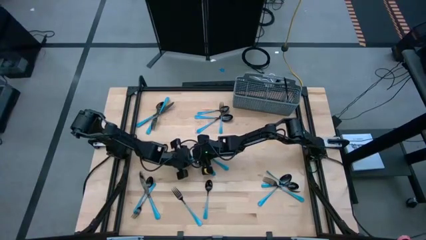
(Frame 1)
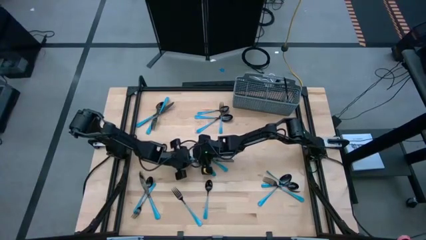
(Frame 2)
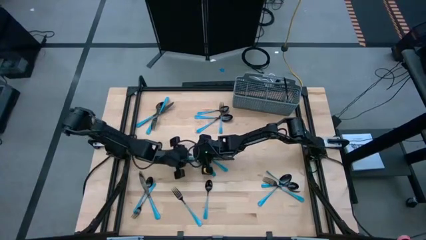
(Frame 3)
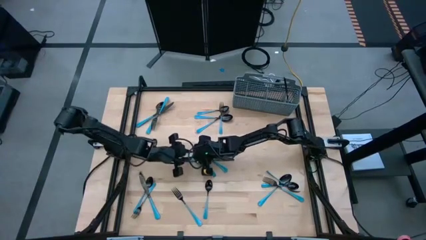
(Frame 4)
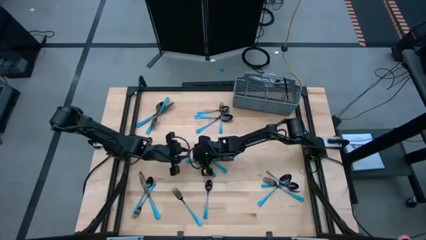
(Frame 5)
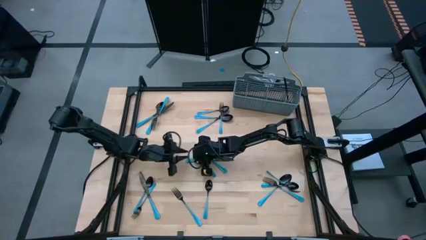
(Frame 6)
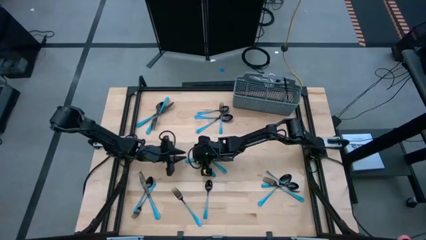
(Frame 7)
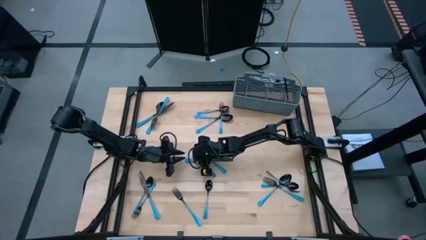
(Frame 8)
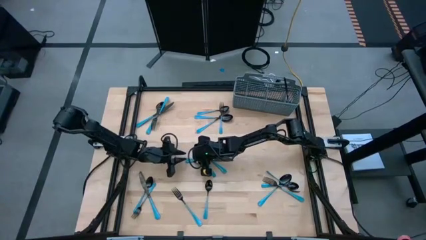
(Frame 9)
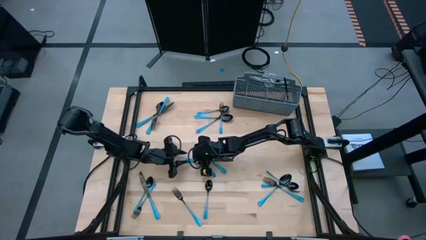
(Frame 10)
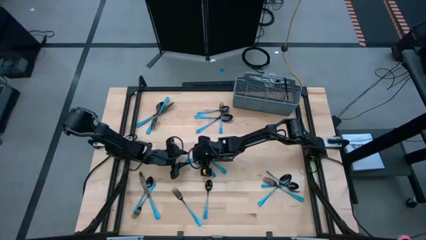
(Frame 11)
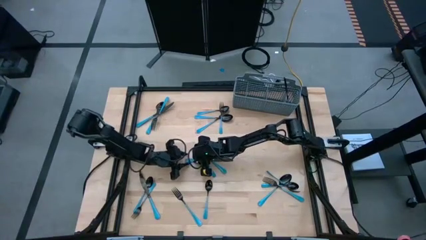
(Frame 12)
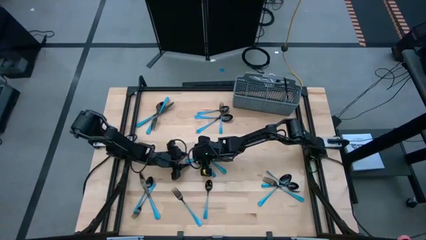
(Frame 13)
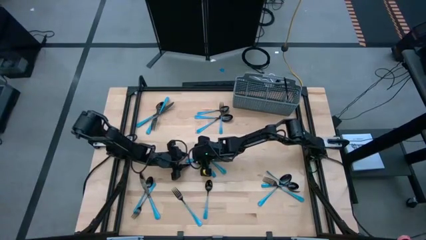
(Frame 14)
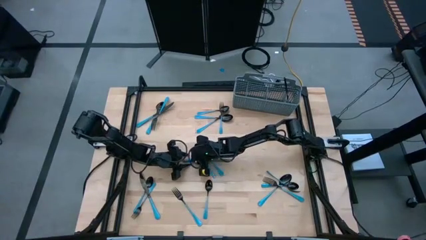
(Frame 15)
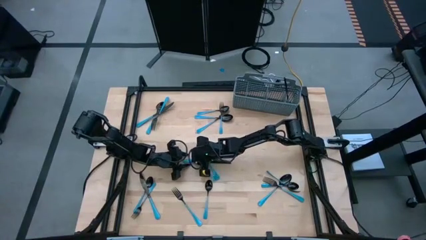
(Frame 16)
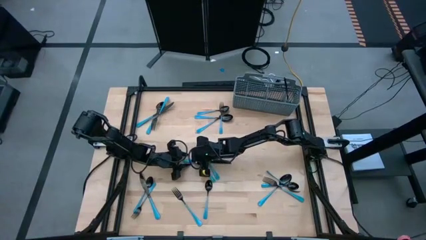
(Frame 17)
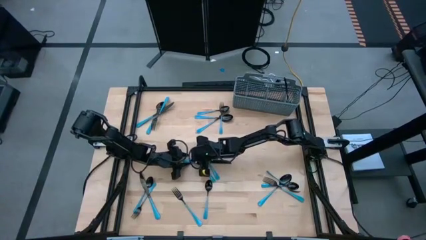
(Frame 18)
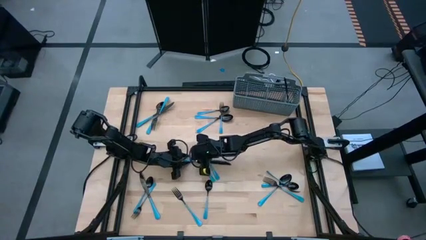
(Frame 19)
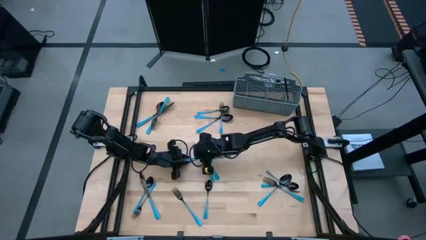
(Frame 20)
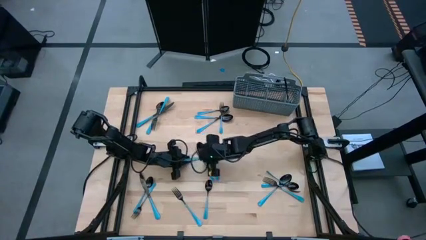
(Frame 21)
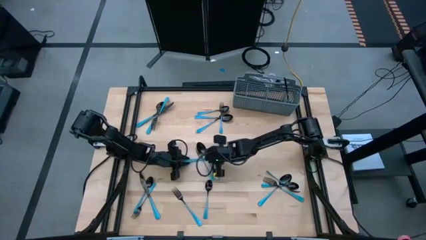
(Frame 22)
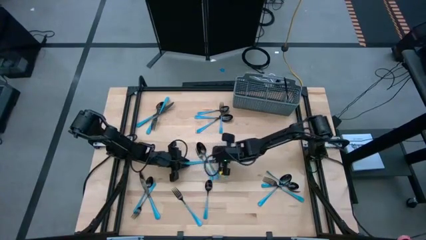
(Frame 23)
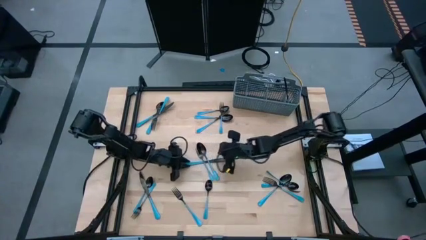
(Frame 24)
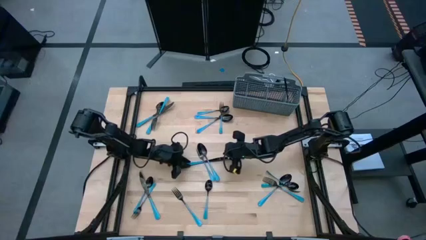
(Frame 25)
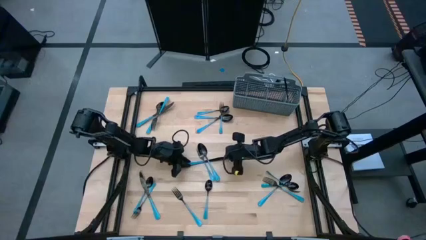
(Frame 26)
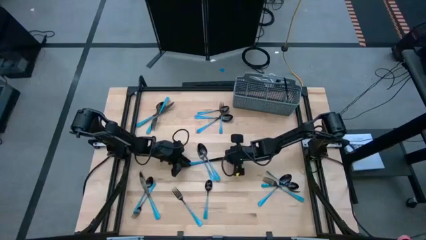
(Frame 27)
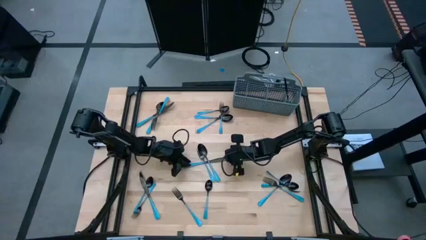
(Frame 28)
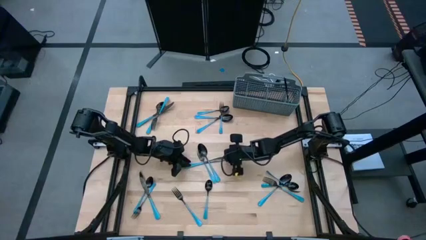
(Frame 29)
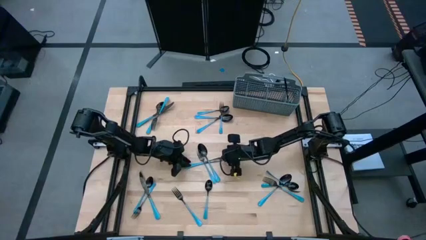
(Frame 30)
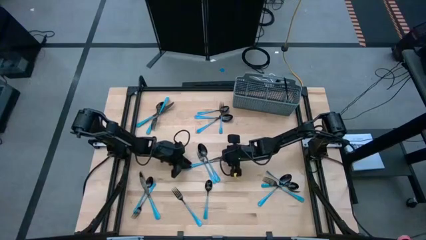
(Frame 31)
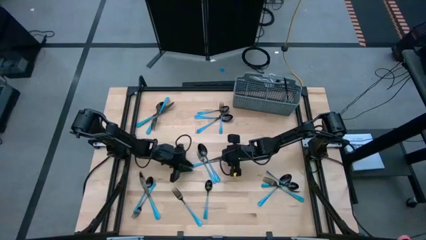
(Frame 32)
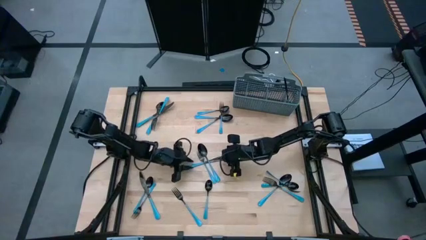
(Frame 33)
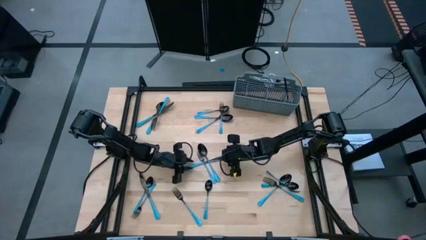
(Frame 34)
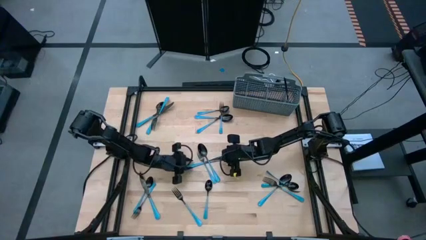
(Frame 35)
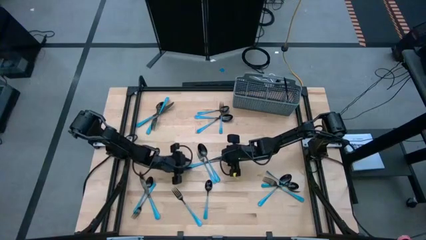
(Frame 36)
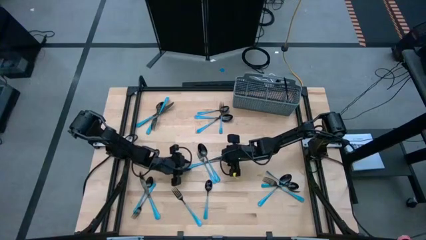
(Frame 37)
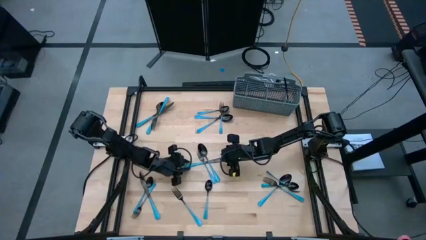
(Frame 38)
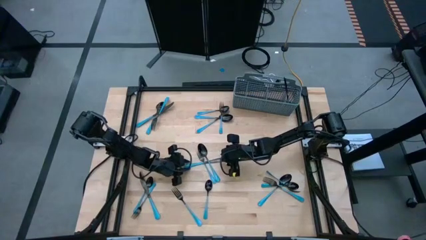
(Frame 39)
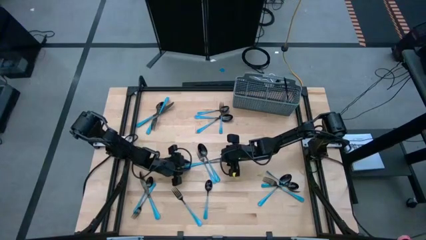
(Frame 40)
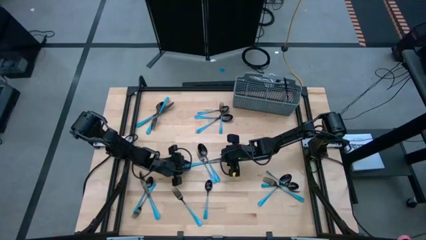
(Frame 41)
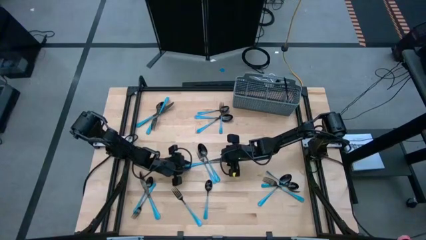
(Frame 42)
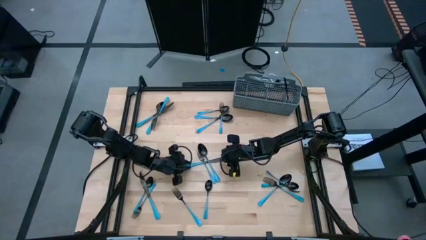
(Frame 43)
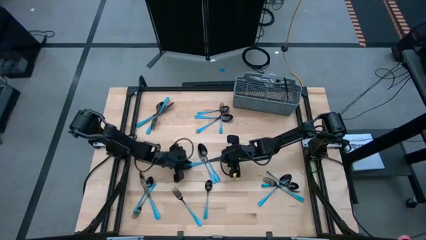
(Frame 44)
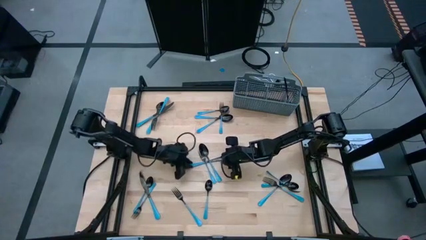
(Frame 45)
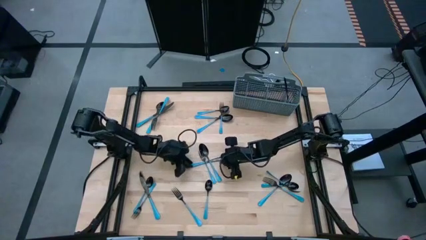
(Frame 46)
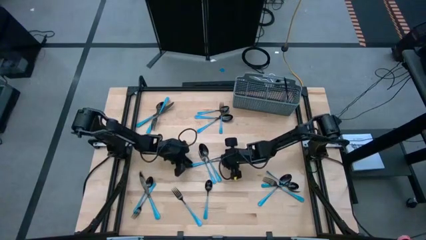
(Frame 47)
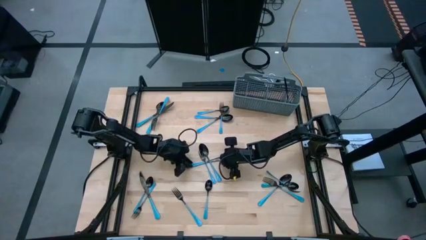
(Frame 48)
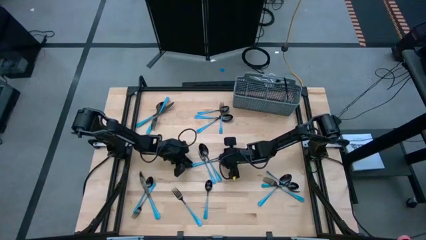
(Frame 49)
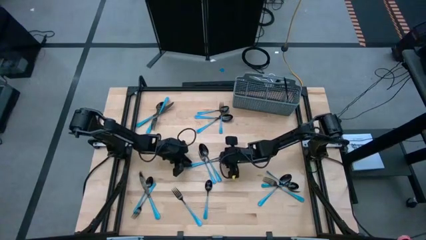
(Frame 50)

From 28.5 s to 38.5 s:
Task: Sort silverware
Put the blue knife into the right of the blue utensil organizer

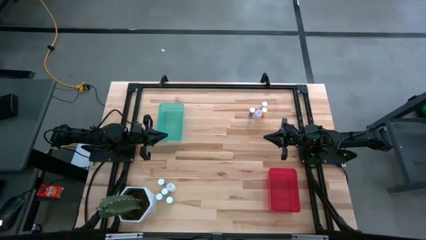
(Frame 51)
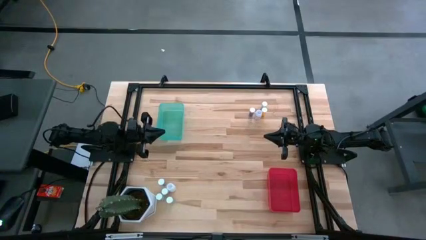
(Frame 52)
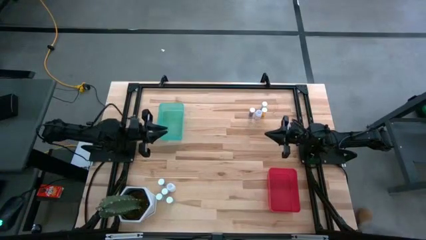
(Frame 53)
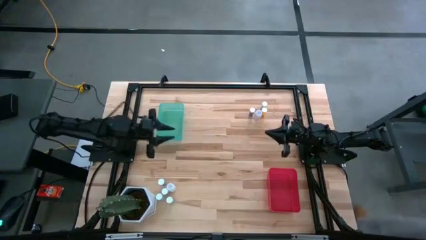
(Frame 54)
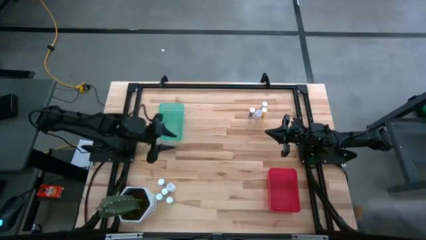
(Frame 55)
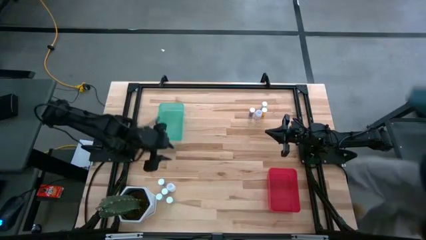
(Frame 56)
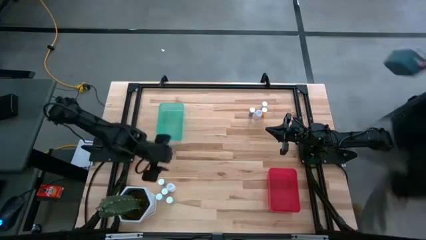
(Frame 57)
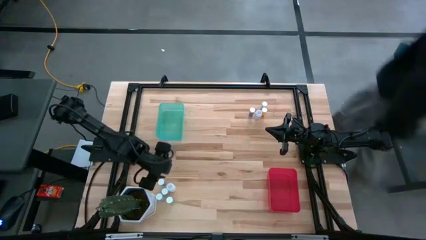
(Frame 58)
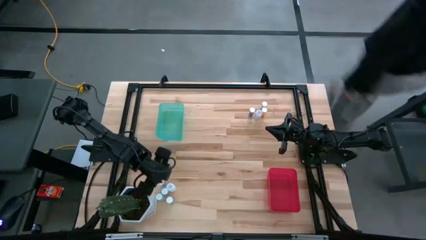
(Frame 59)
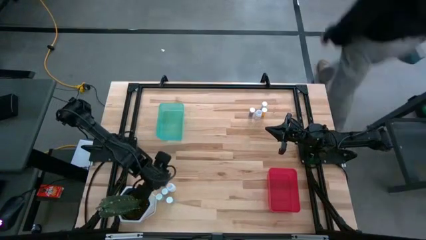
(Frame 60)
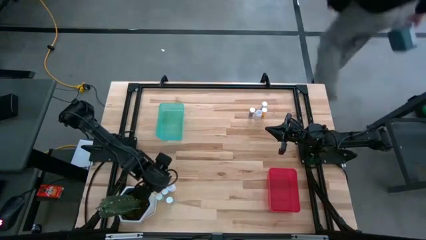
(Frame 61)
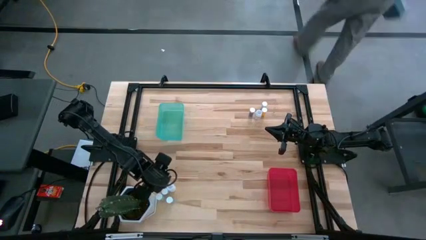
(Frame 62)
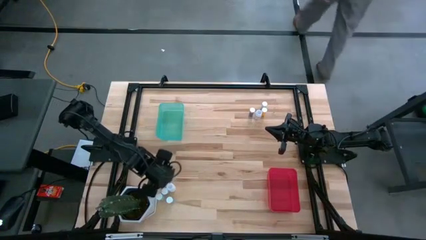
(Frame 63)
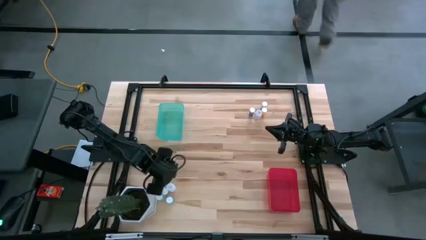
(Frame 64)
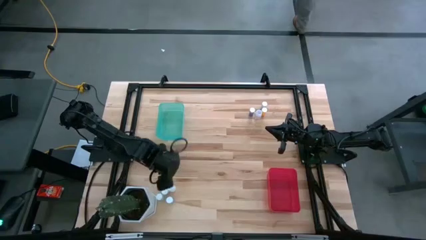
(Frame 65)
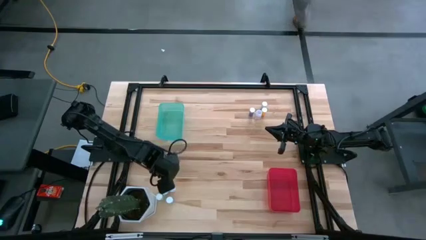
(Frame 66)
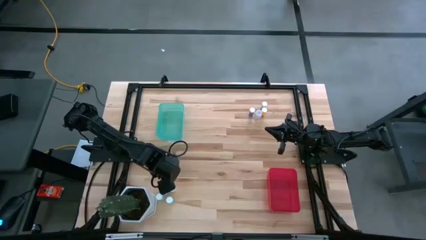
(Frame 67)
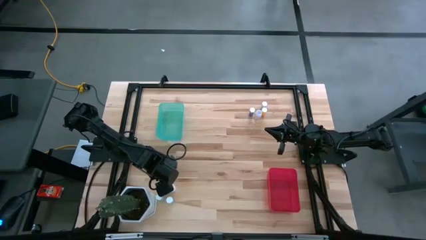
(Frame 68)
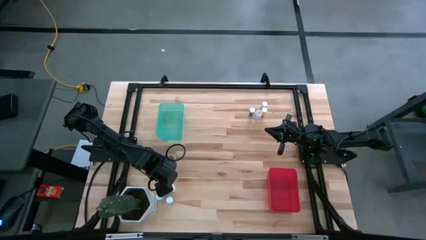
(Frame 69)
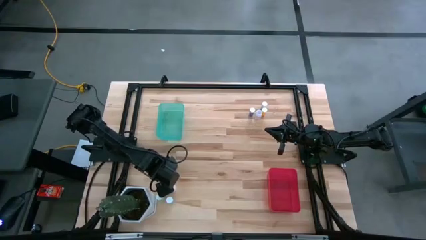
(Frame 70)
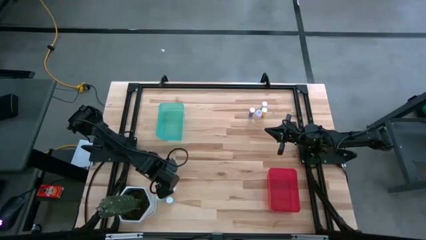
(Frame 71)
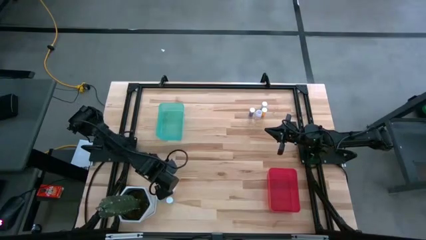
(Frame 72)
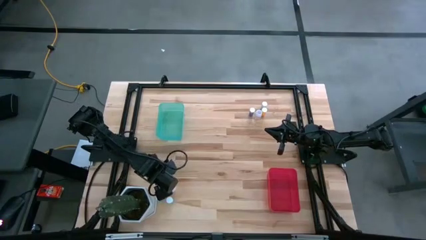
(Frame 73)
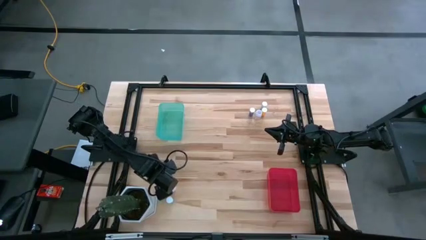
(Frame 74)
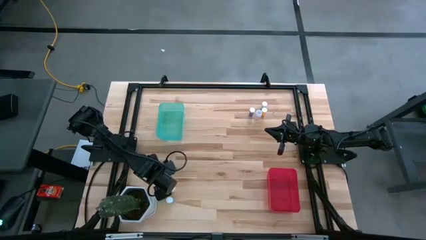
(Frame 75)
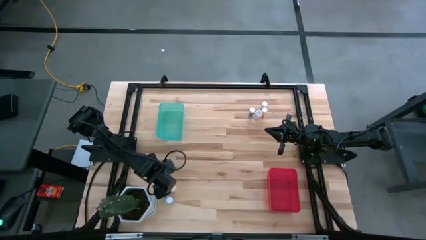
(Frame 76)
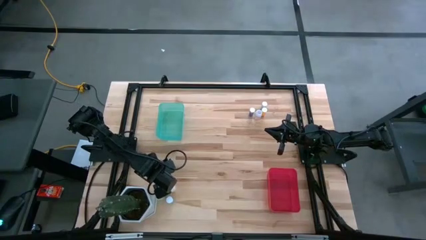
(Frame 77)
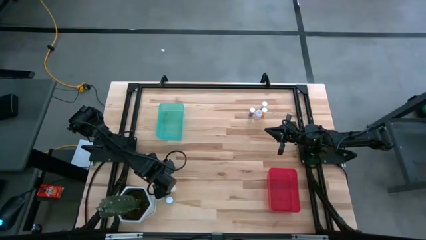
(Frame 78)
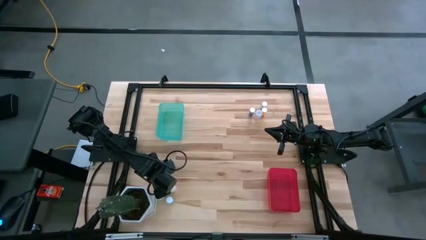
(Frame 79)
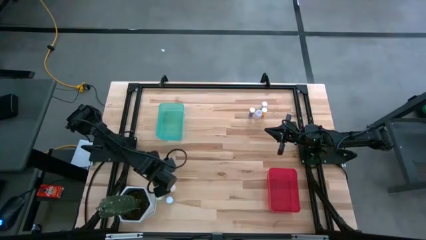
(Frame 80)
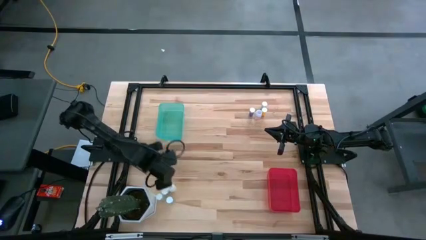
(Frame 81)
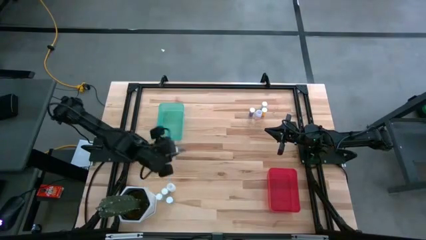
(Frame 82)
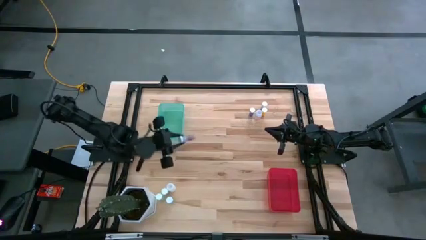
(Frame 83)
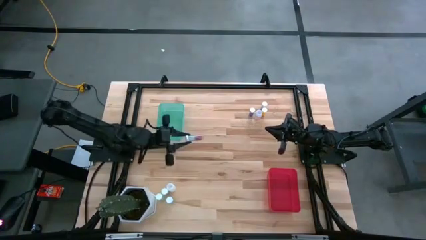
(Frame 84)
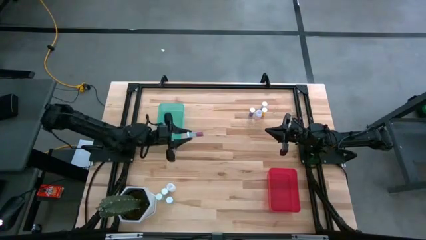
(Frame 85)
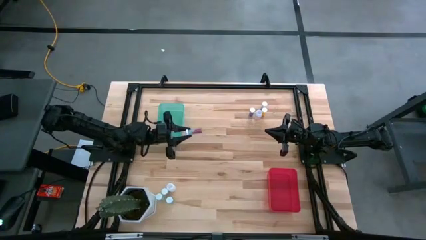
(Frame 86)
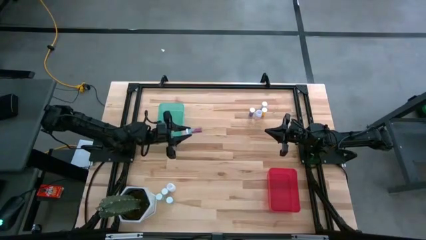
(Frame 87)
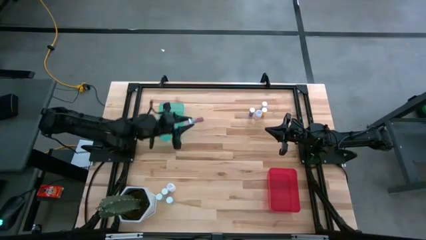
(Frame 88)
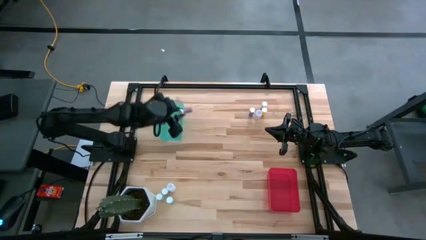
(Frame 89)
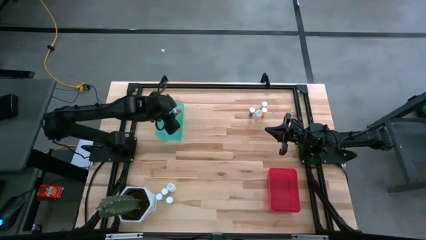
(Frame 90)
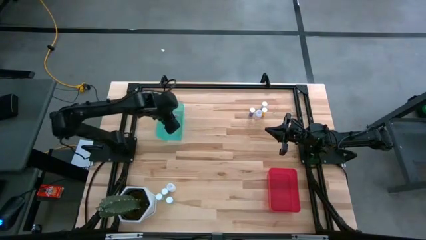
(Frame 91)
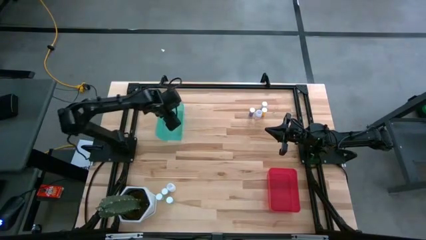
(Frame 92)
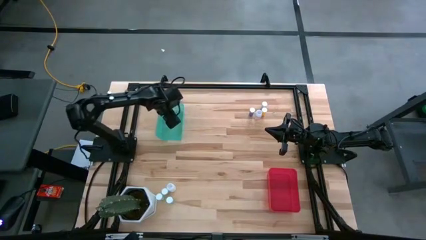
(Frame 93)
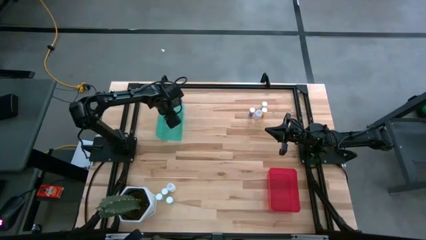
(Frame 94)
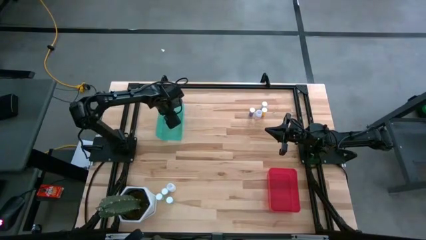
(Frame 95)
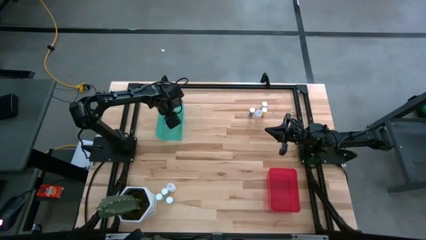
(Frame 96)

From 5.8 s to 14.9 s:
Task: Pick and place medicine bottles into bin by pill shape (circle, oval)
Put the blue capsule bottle into the blue bin
